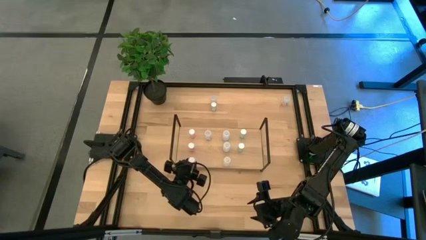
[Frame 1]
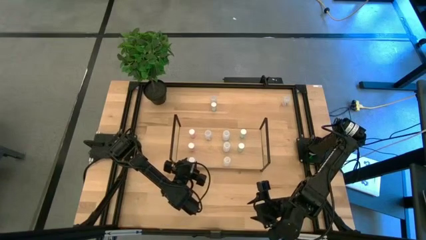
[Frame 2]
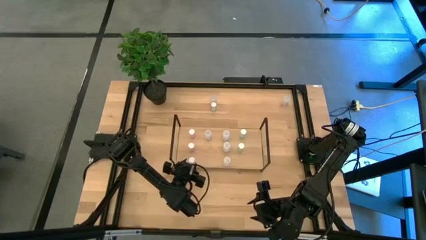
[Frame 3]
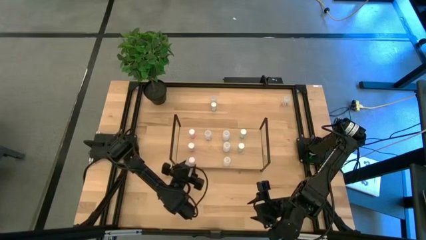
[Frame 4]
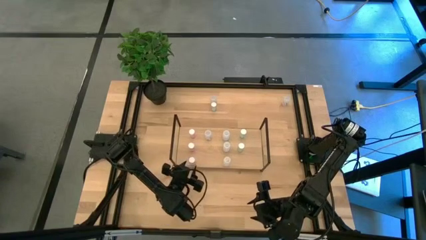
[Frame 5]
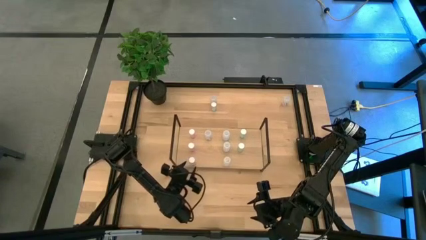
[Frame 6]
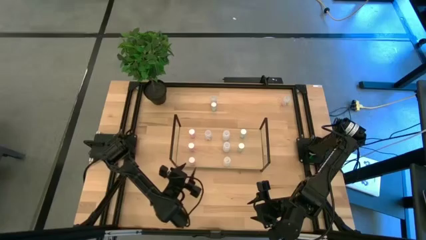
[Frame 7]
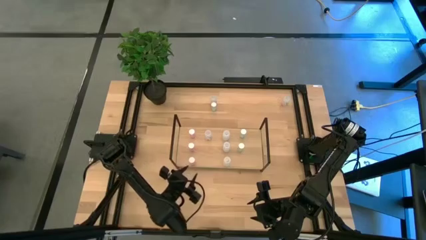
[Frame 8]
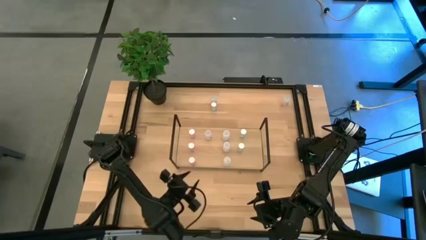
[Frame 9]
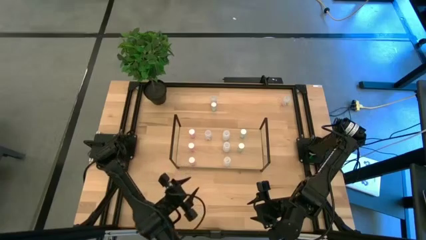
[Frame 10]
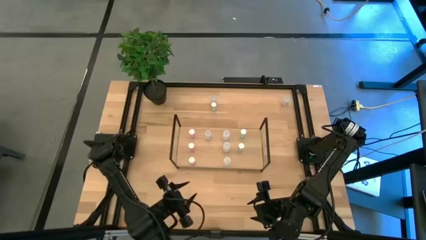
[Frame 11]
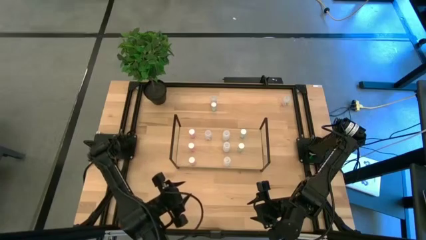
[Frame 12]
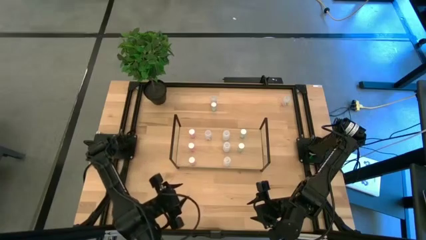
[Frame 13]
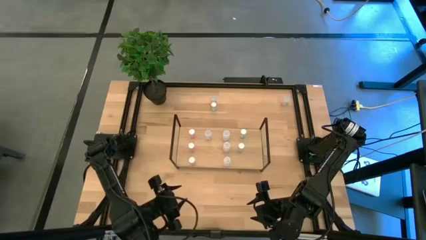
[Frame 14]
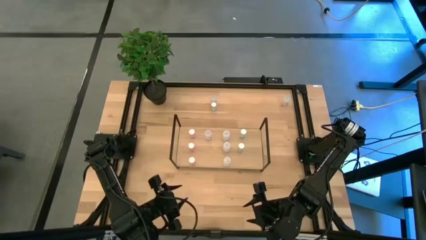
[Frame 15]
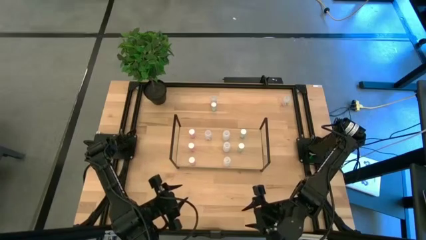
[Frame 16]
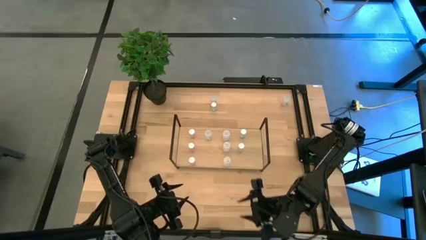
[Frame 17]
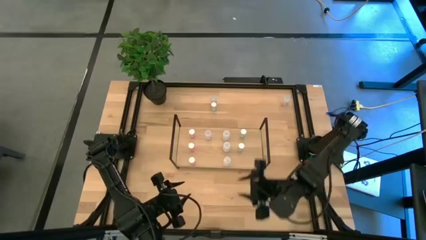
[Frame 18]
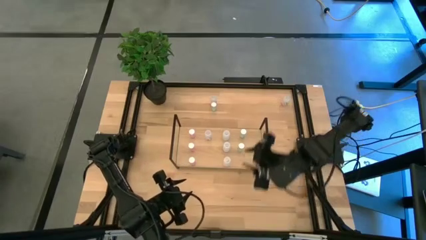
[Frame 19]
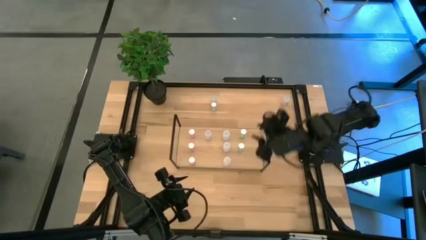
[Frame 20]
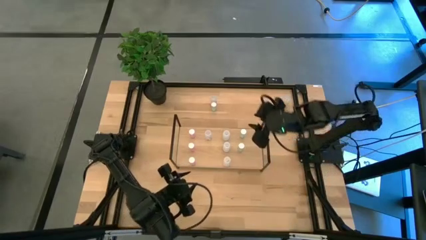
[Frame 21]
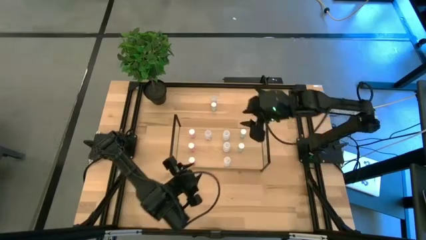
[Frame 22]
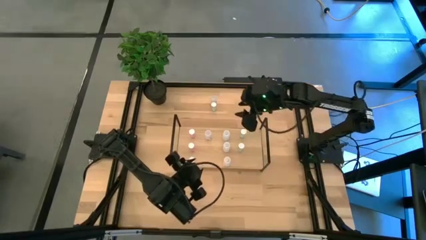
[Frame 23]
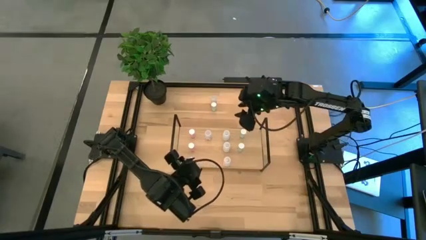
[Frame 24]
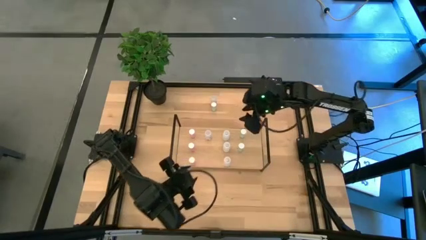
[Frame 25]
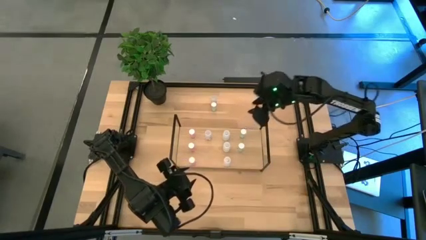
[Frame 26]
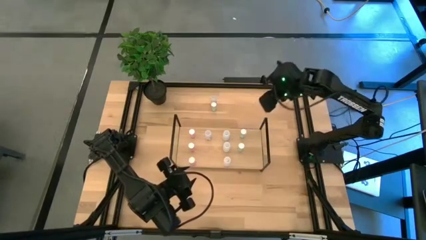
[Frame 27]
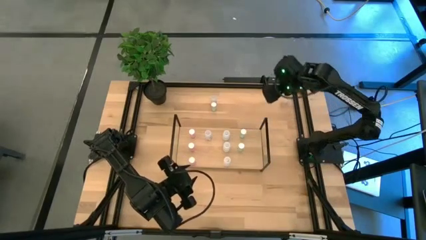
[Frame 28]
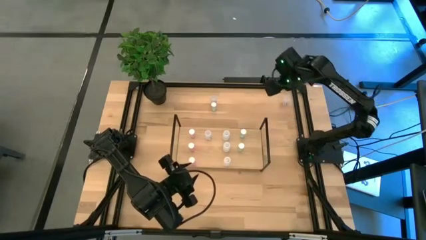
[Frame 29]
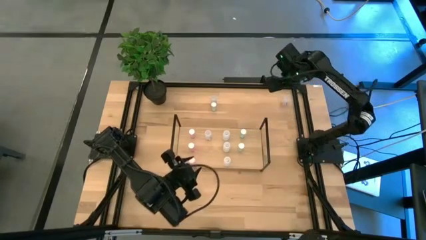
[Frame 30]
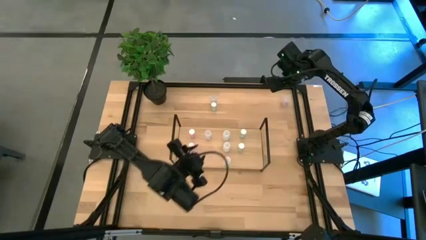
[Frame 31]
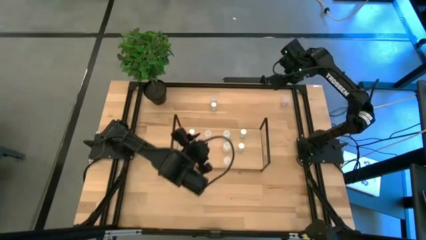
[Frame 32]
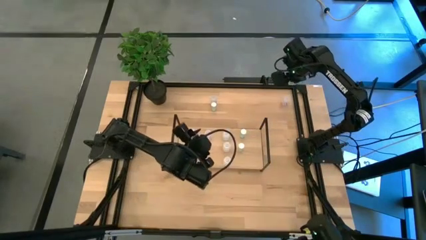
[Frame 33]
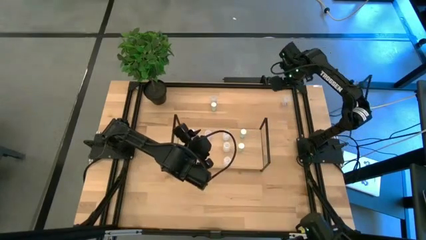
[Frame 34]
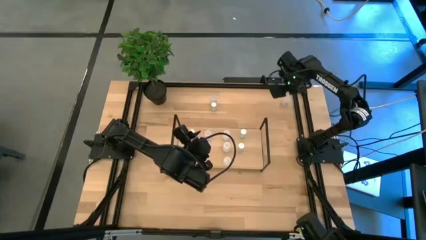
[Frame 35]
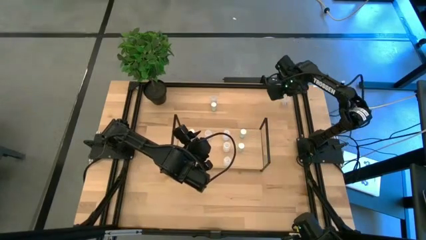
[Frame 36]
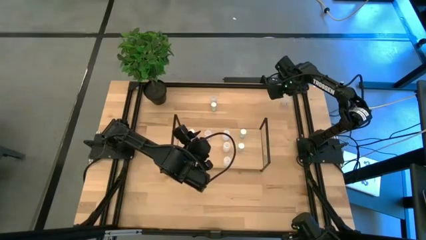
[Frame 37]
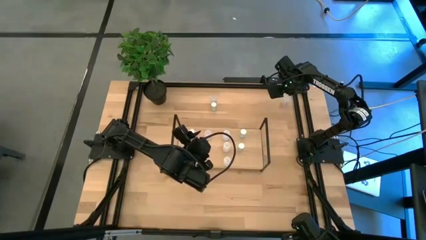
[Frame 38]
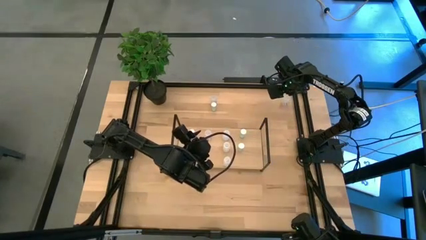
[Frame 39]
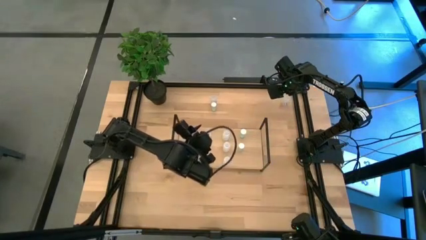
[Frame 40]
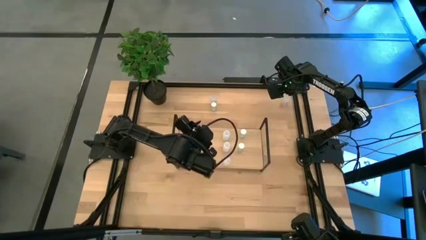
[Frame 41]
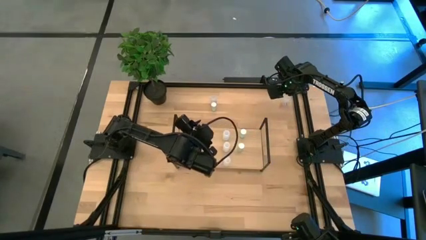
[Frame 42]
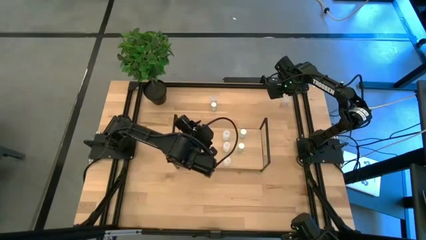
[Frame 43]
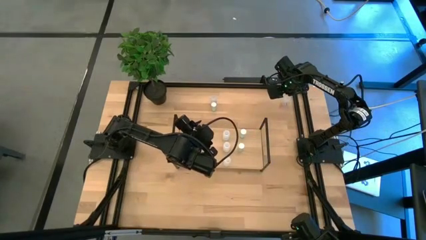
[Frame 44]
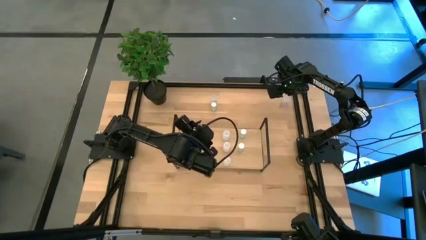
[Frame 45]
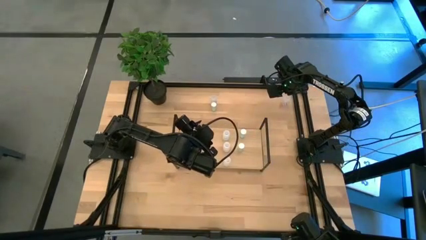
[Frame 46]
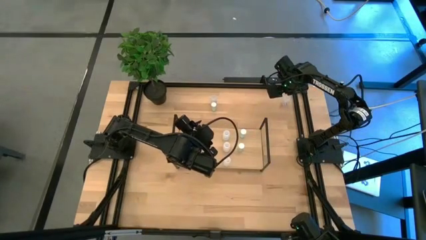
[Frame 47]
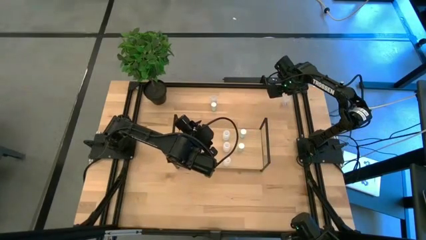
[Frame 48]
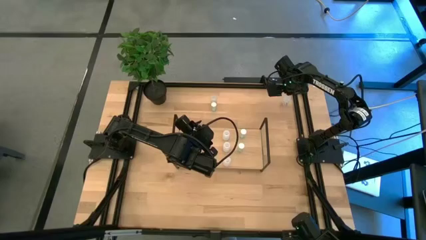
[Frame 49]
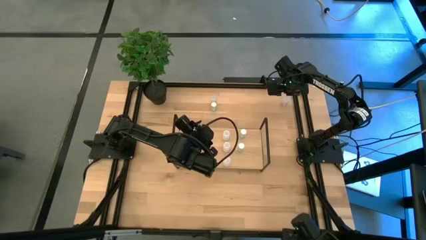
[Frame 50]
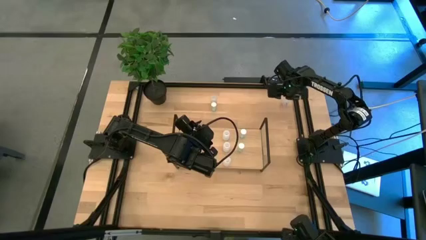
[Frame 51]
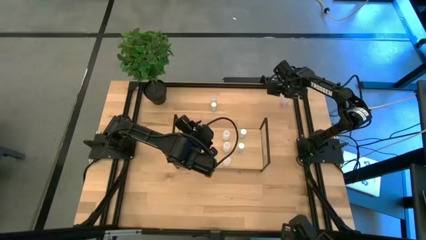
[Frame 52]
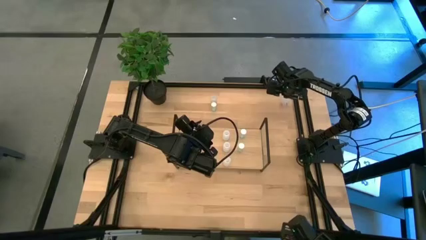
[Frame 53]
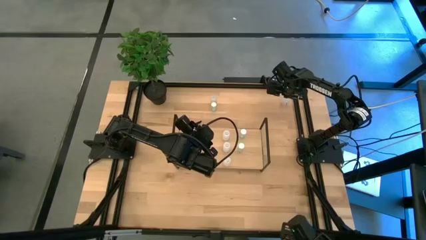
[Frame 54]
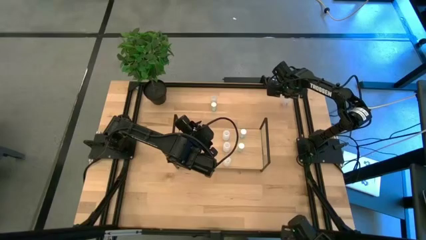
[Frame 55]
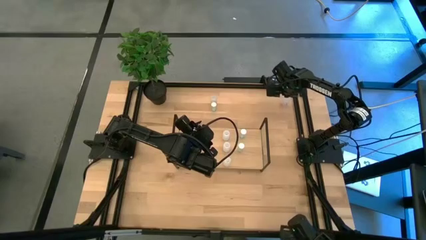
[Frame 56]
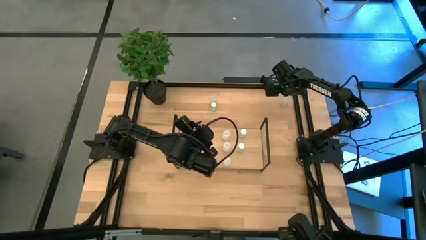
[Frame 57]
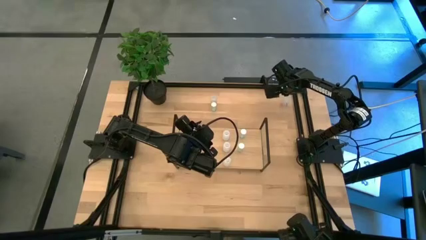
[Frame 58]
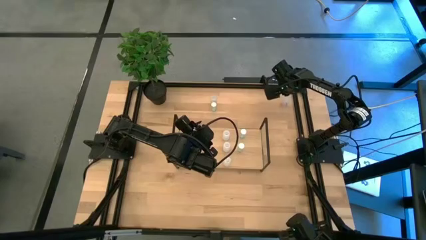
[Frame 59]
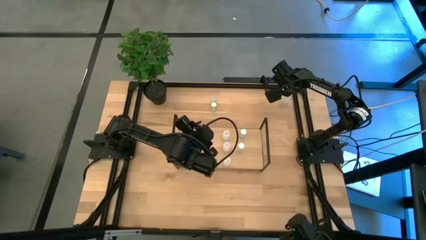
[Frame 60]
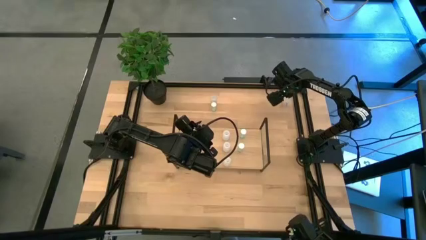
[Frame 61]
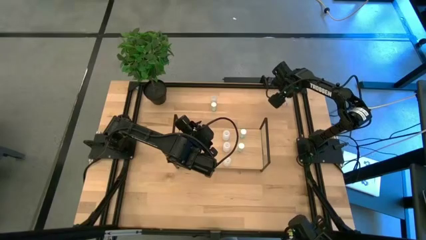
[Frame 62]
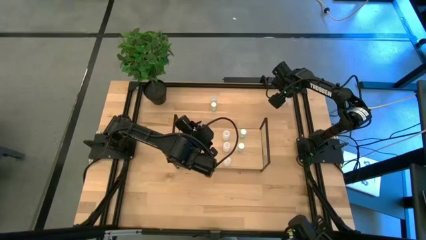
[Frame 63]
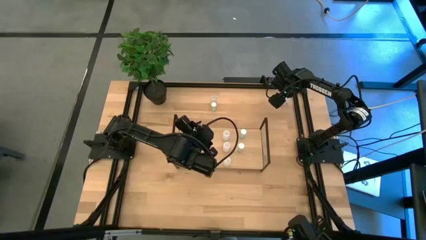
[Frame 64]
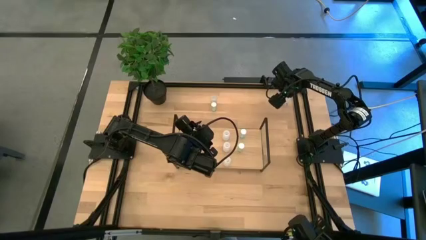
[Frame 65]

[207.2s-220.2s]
Task: Pick and place medicine bottles onto shelf by color
Put the right transparent pill bottle on the shelf aligned with the other transparent pill bottles

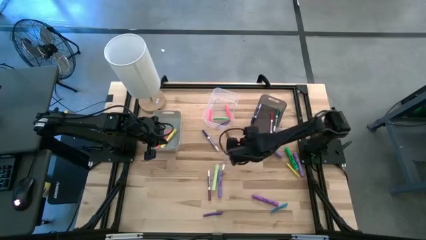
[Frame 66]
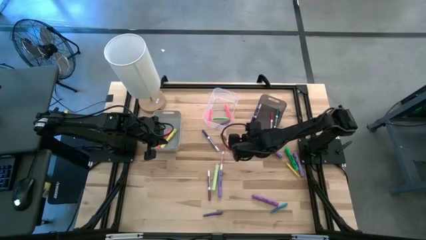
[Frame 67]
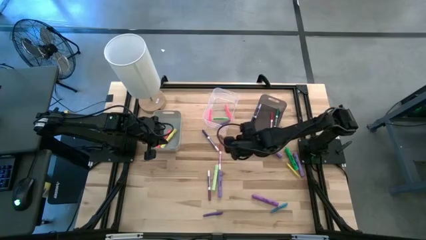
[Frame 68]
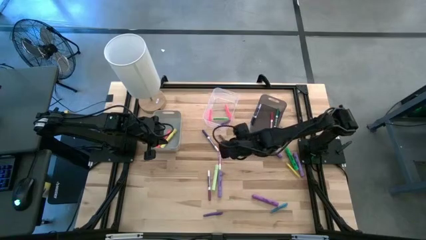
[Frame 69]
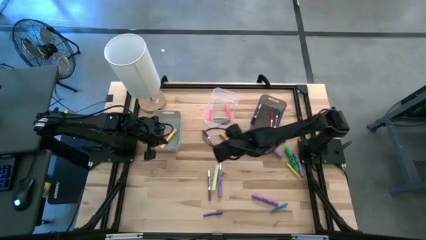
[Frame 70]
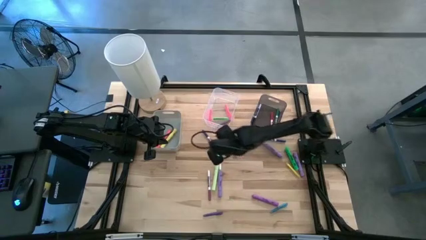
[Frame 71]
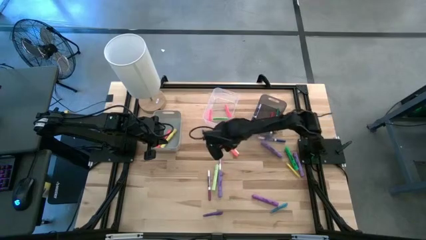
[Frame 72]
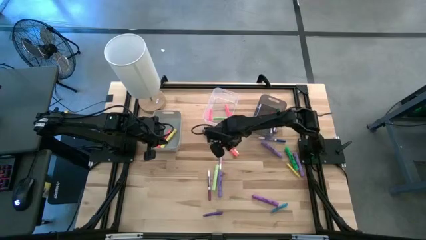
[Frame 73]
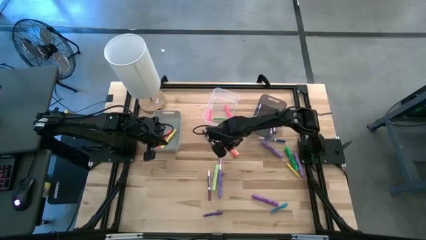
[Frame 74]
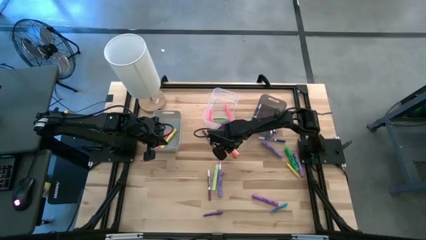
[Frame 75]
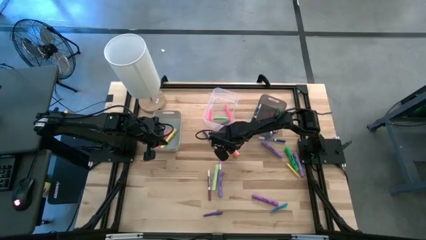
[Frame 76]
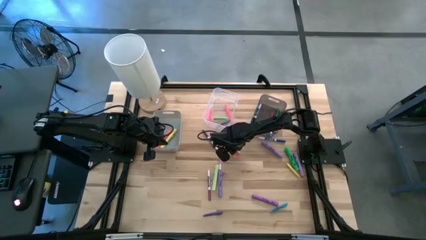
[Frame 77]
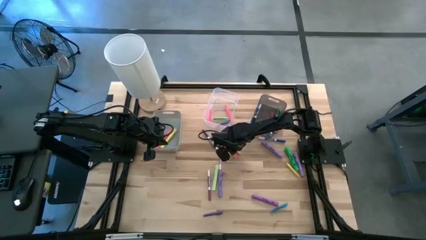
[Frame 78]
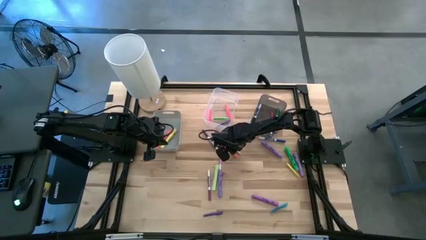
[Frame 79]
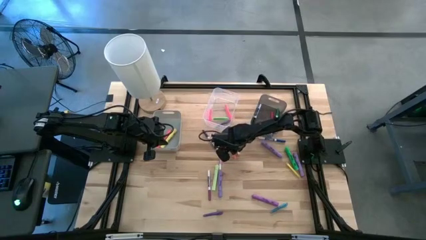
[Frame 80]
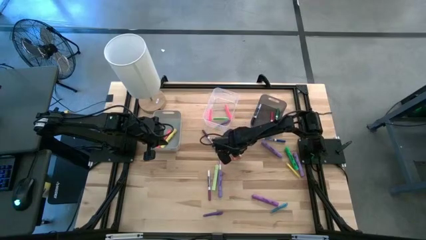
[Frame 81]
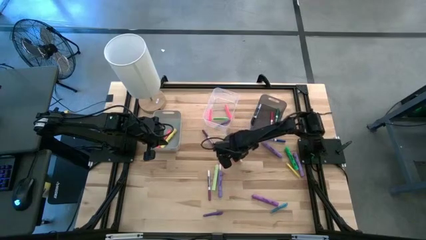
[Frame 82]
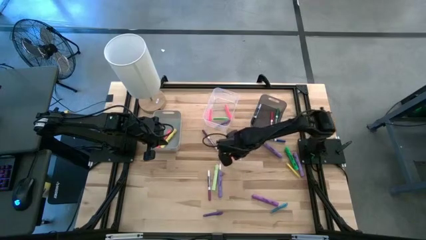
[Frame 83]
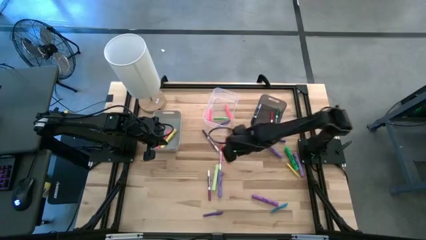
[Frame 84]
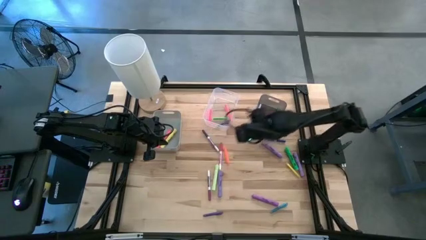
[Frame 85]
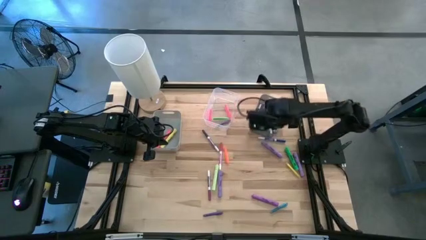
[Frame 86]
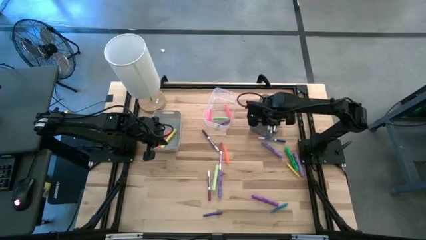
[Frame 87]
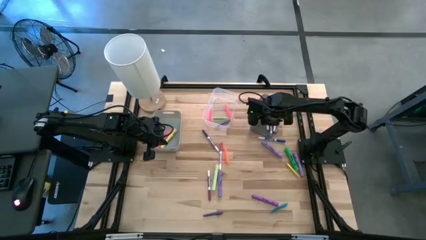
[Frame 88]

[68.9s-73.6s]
Task: Pick & Place Markers
Put the brown marker into the black bin
